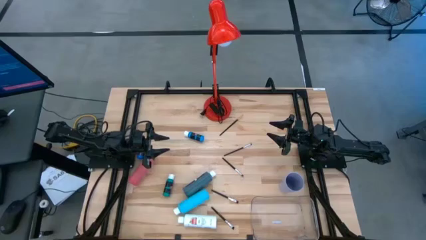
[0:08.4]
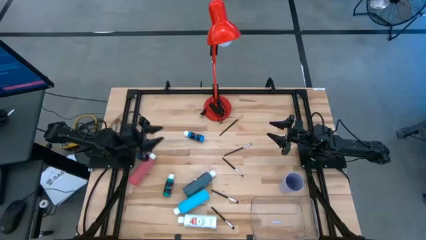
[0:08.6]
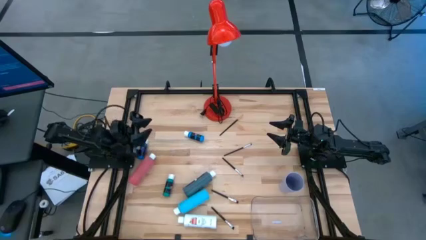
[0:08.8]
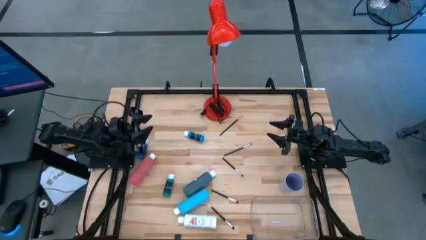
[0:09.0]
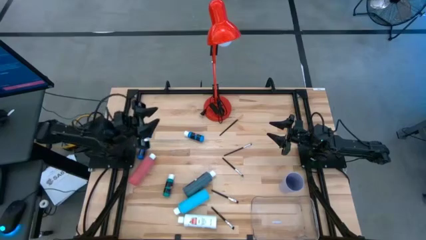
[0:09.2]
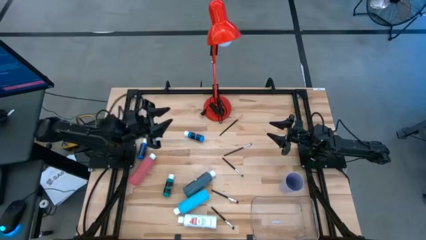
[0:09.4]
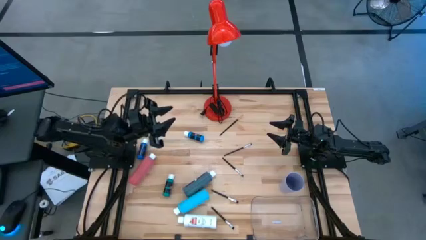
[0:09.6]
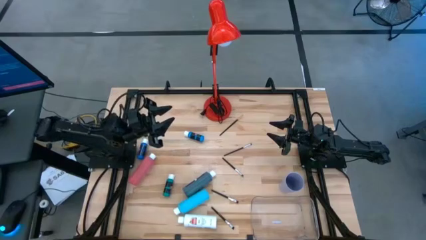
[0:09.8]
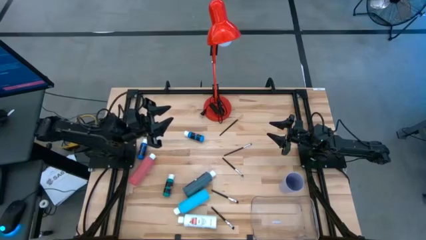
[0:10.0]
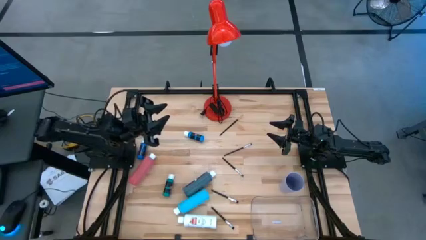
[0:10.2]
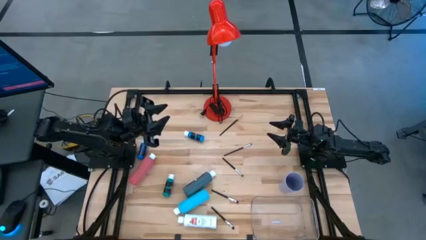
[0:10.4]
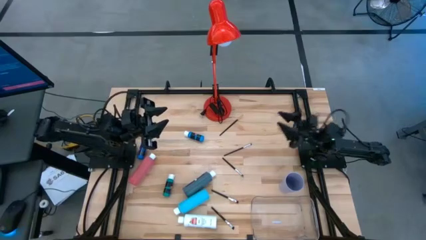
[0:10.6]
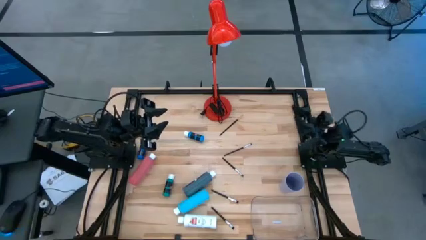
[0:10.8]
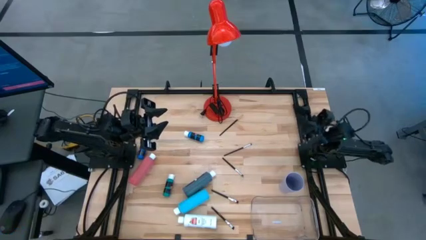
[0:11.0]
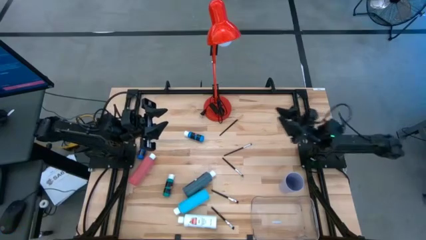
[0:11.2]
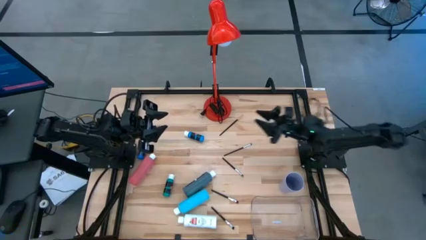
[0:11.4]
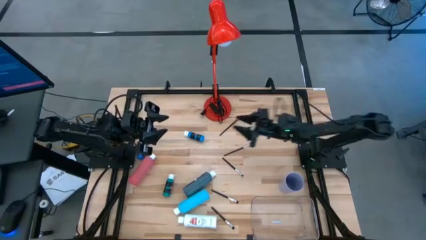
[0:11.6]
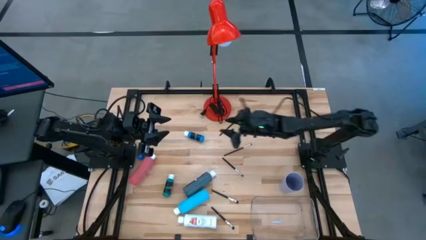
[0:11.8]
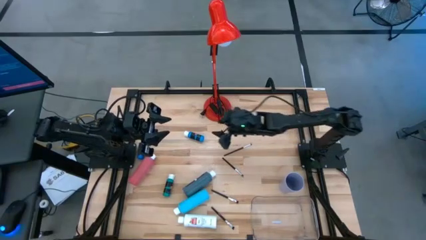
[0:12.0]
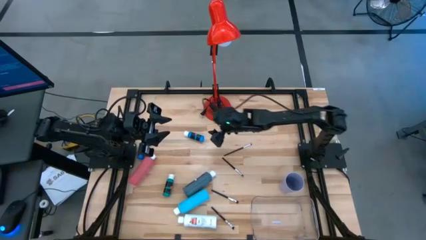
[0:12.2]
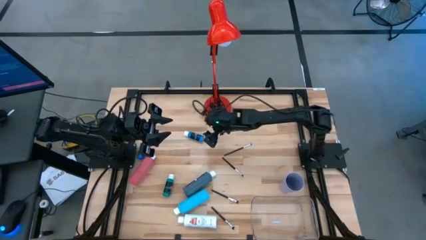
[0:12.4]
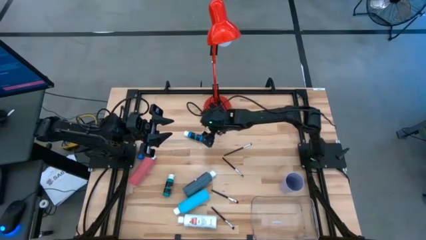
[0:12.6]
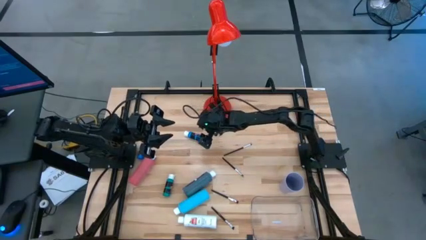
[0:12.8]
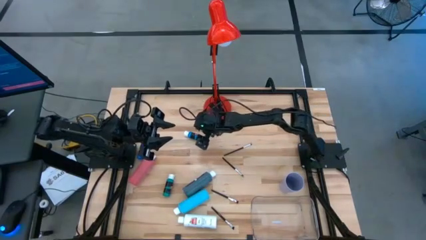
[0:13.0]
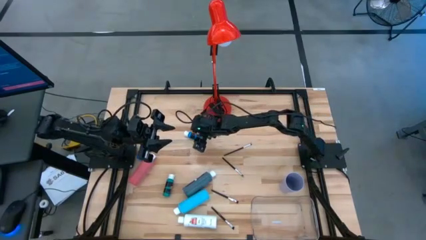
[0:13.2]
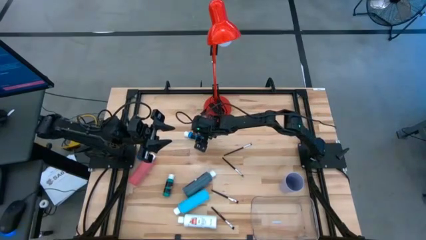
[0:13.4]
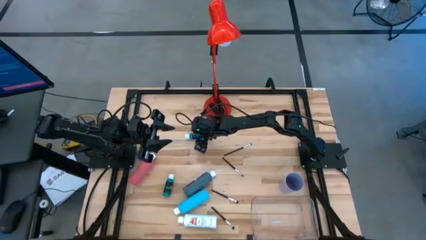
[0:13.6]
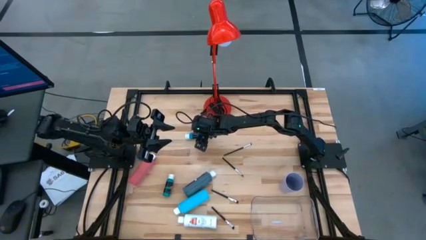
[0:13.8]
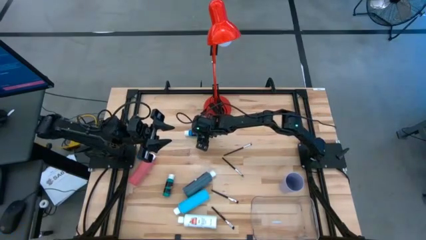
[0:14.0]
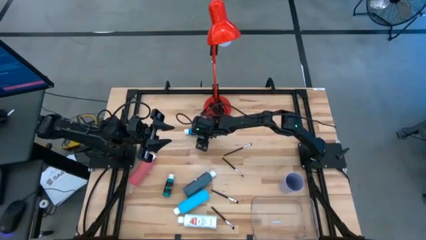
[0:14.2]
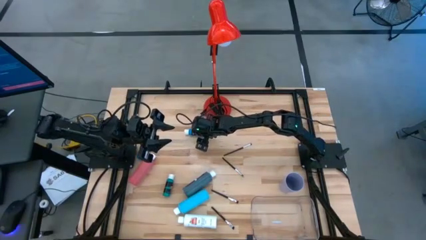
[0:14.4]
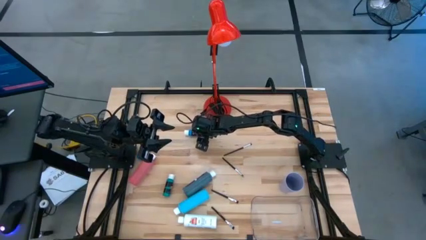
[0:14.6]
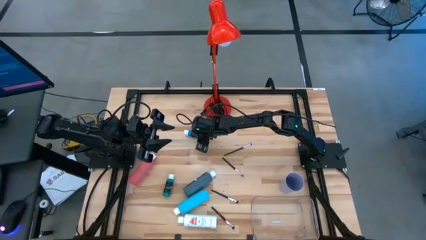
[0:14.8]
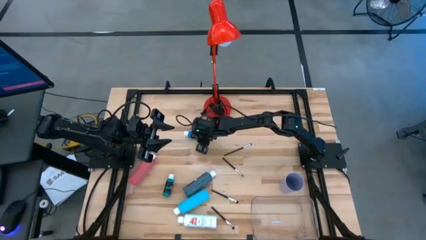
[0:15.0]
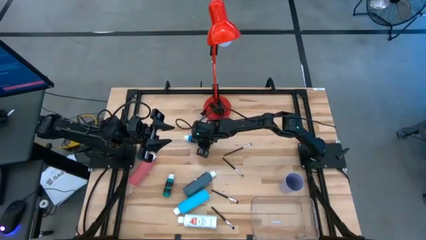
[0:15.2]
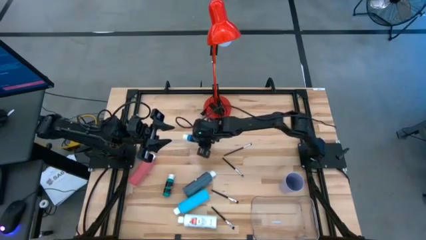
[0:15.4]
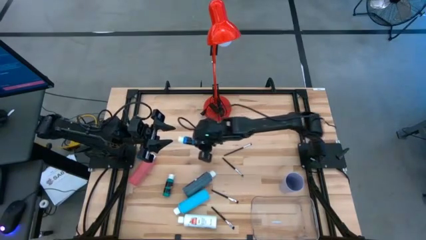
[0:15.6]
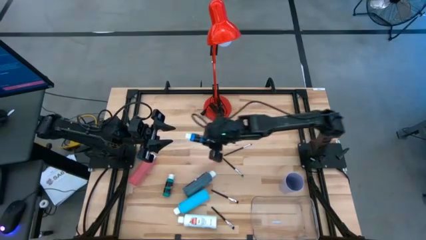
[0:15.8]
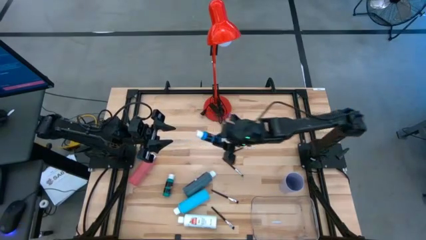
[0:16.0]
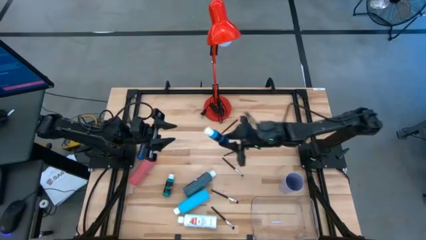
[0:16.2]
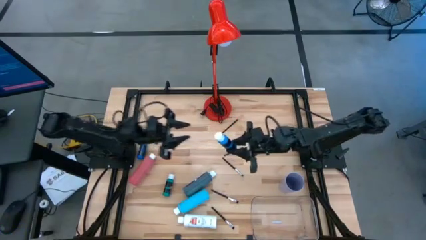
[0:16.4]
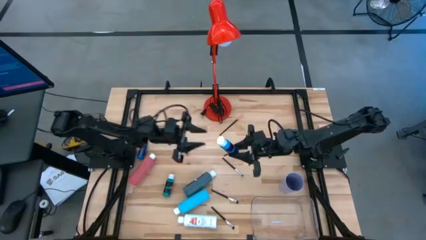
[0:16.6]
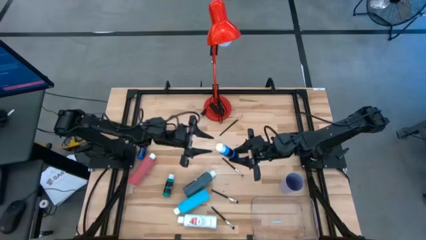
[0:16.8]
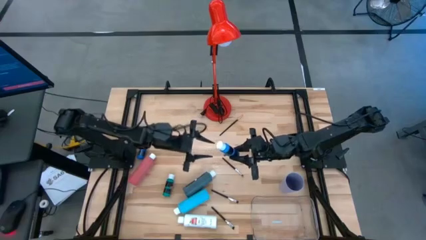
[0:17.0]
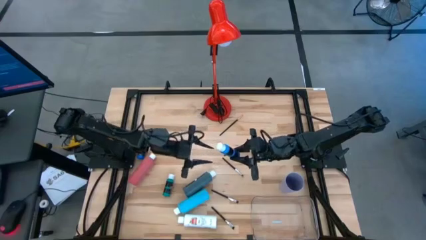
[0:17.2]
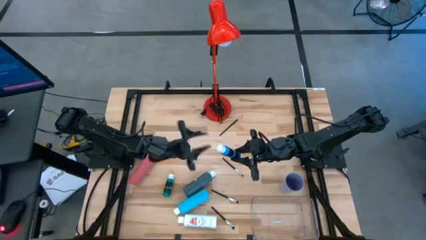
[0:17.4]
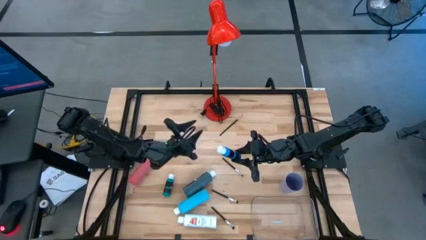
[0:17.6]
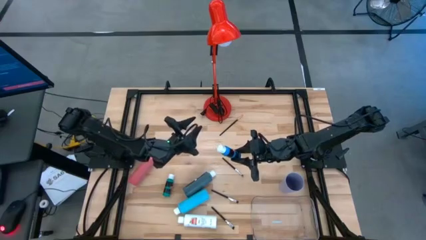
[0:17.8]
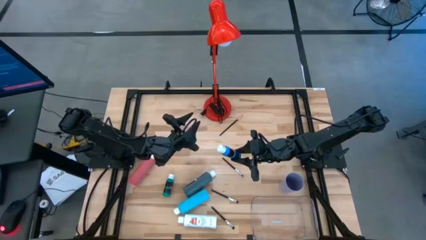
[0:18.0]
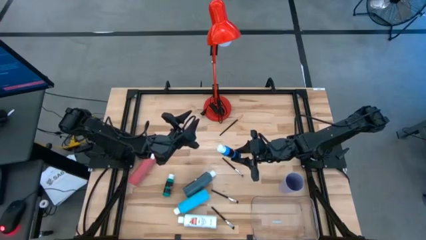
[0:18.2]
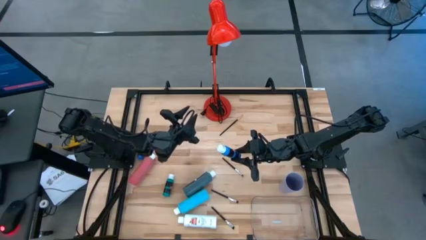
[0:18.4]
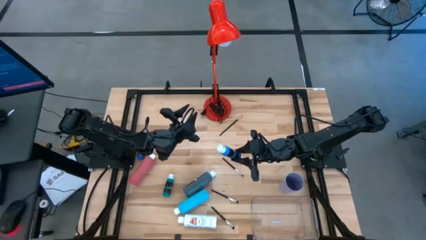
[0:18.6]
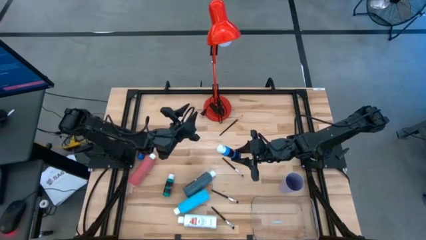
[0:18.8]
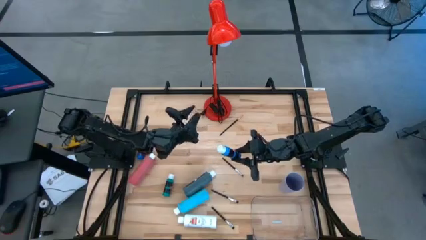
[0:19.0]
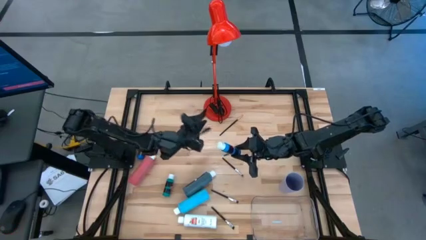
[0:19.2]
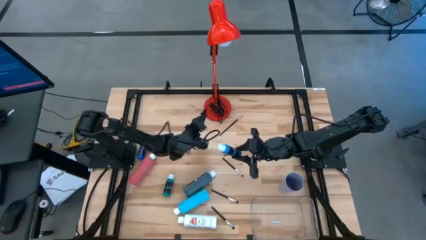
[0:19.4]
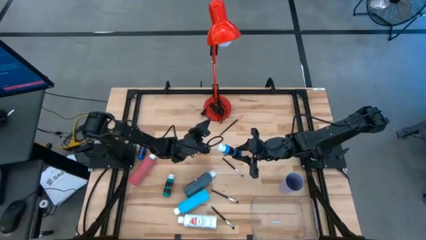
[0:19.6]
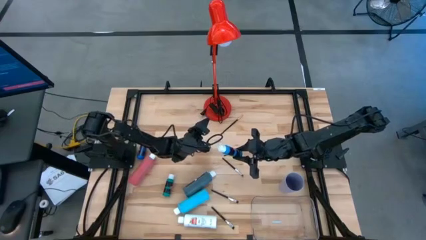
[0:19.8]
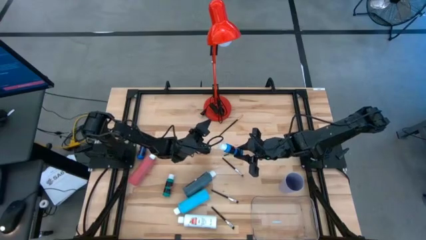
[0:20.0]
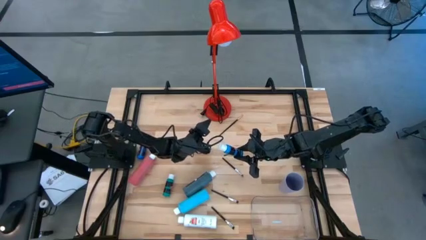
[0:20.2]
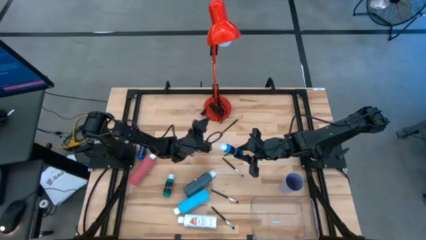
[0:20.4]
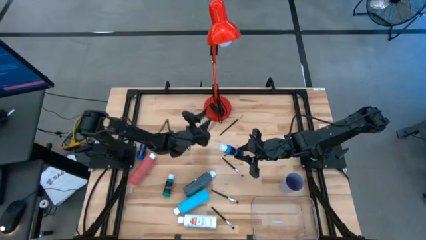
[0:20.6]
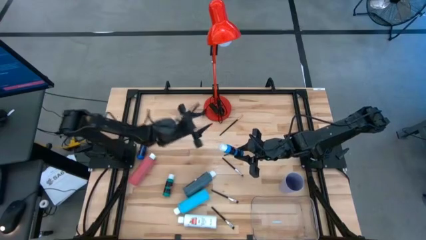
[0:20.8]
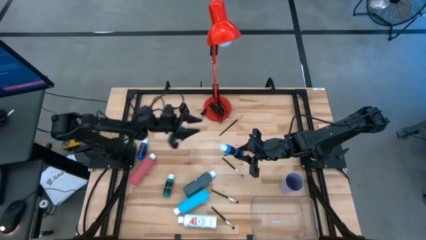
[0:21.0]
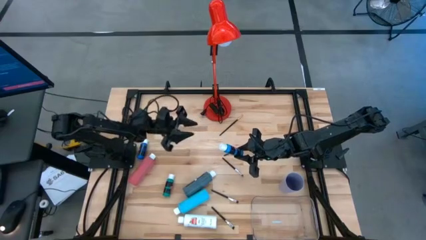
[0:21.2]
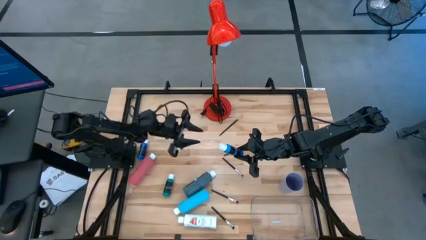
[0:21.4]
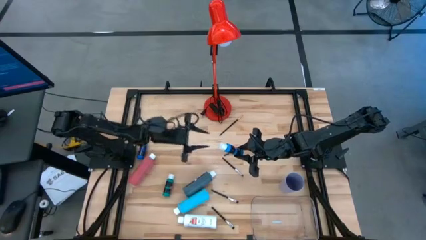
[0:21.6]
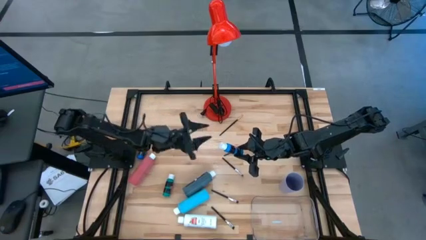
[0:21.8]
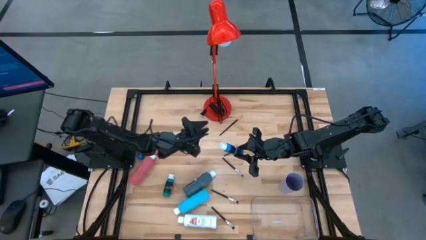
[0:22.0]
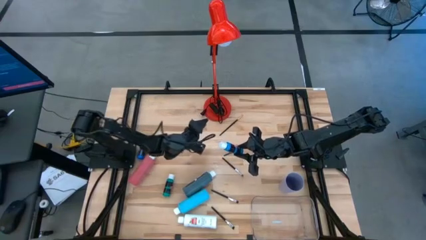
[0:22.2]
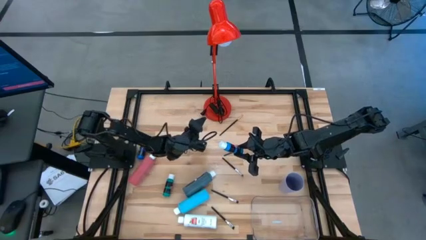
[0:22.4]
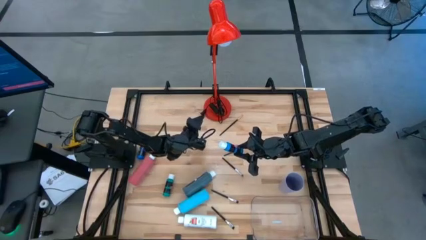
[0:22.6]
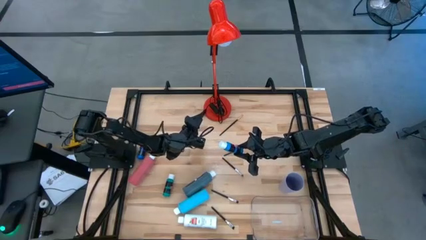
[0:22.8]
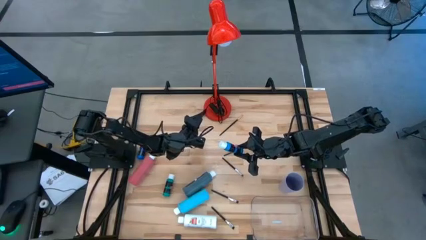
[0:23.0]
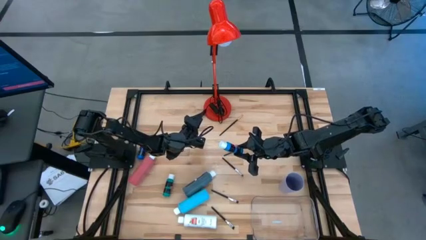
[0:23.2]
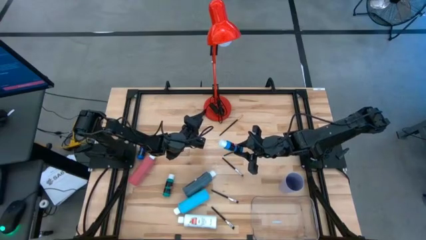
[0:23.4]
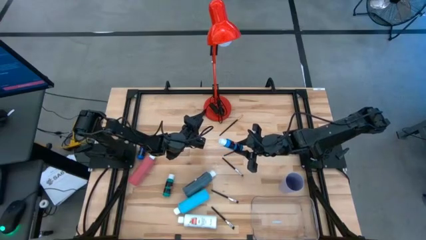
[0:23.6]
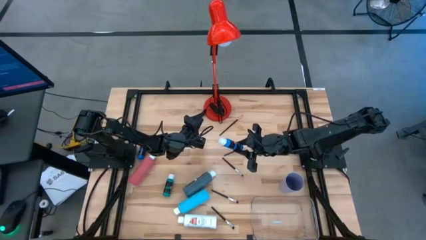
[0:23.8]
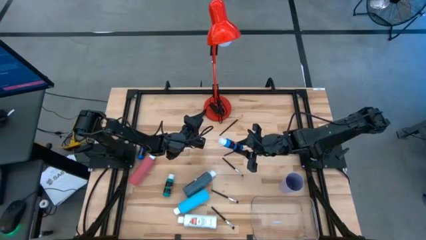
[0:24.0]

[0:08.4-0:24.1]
Task: Pick & Place Paint Supplies
Put the blue paint bottle into the transparent bin
